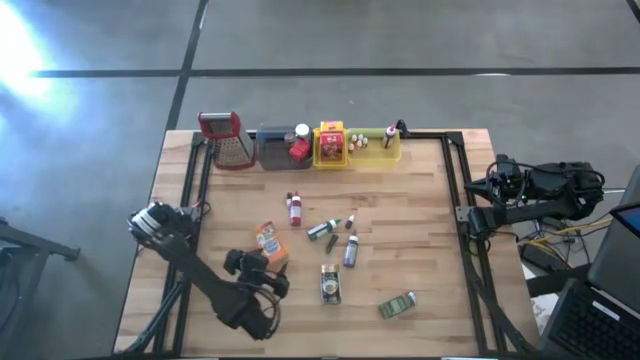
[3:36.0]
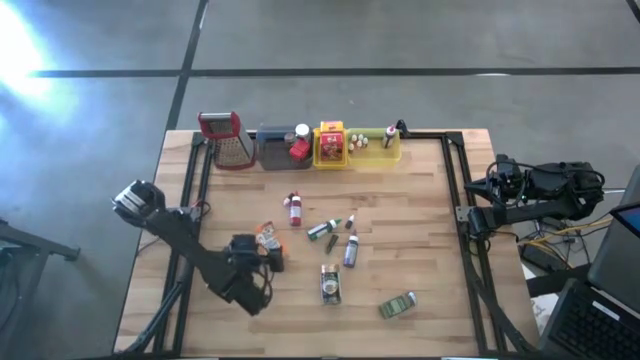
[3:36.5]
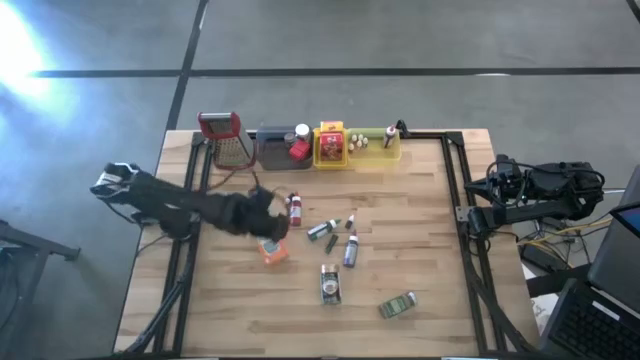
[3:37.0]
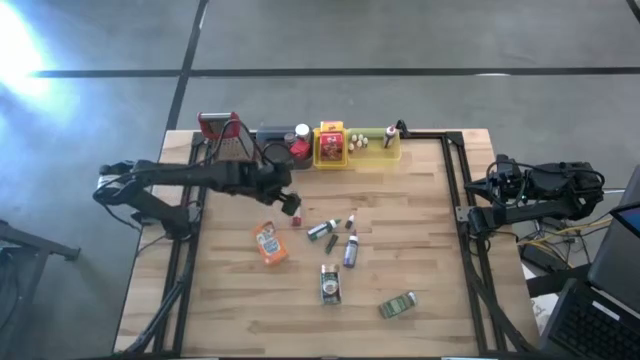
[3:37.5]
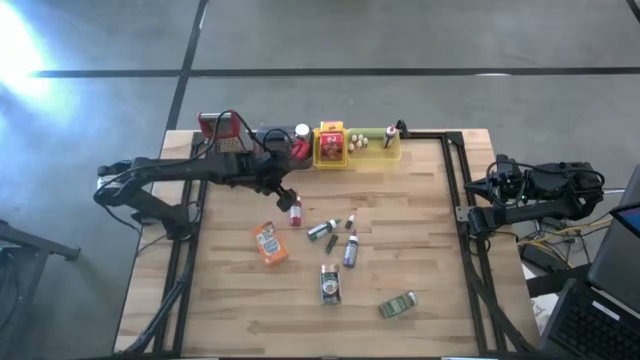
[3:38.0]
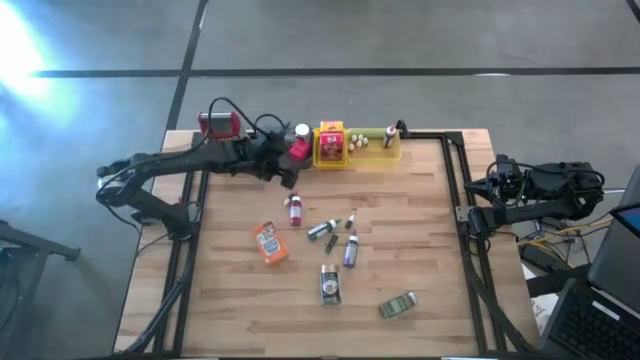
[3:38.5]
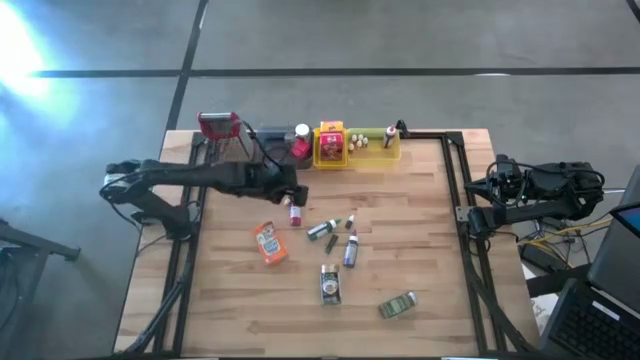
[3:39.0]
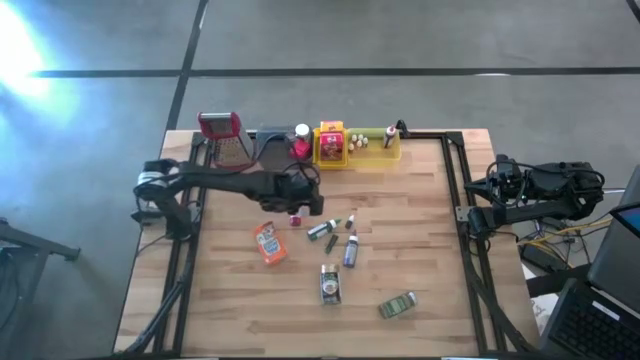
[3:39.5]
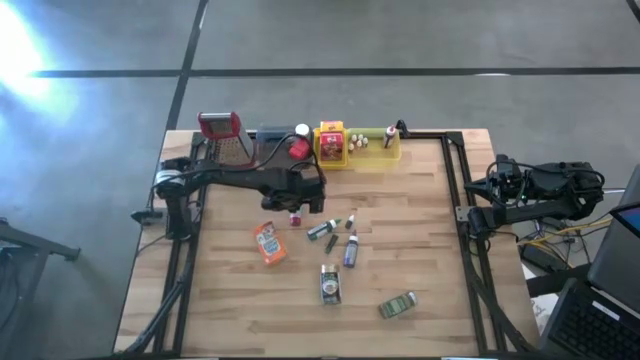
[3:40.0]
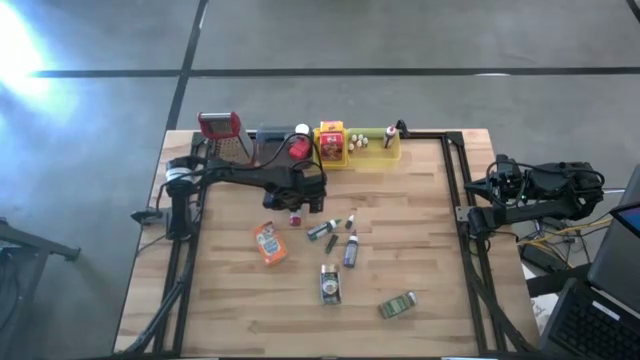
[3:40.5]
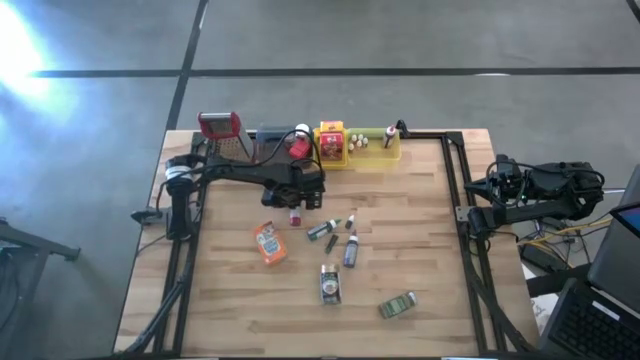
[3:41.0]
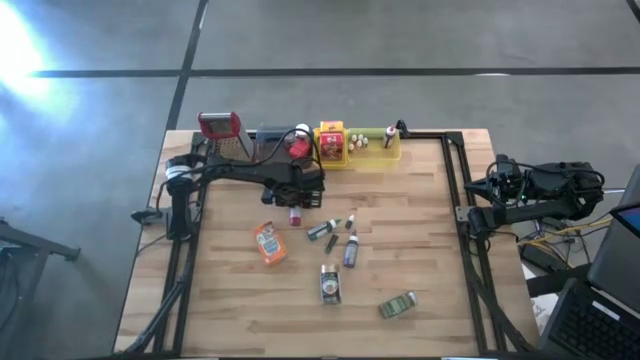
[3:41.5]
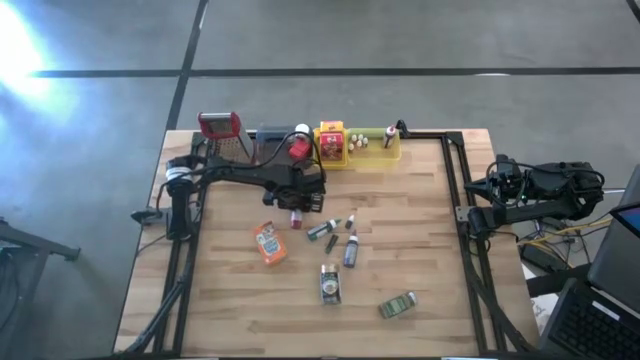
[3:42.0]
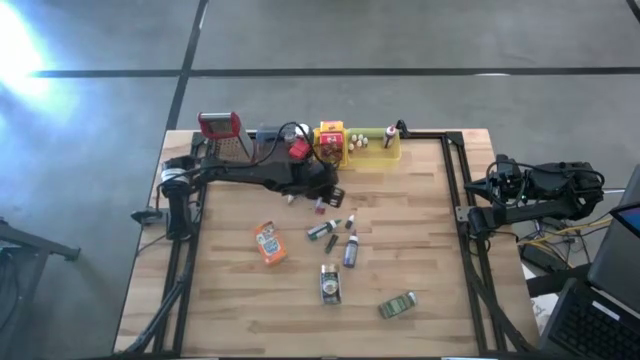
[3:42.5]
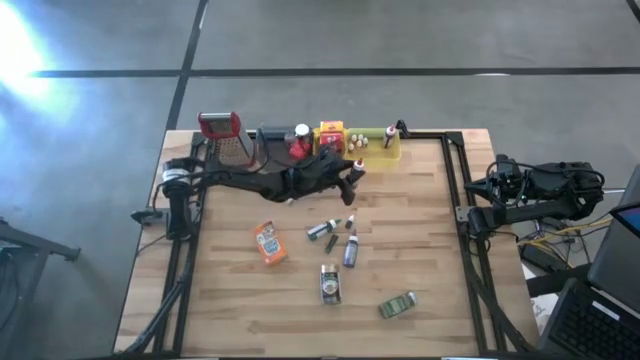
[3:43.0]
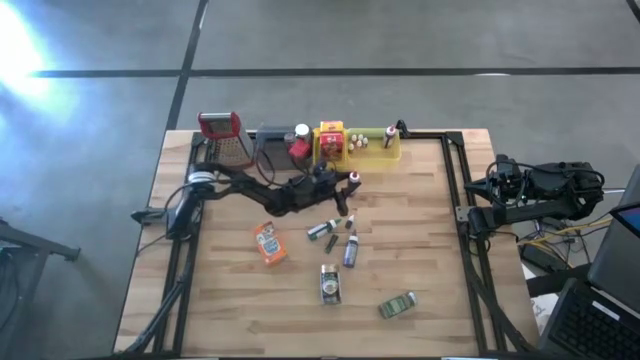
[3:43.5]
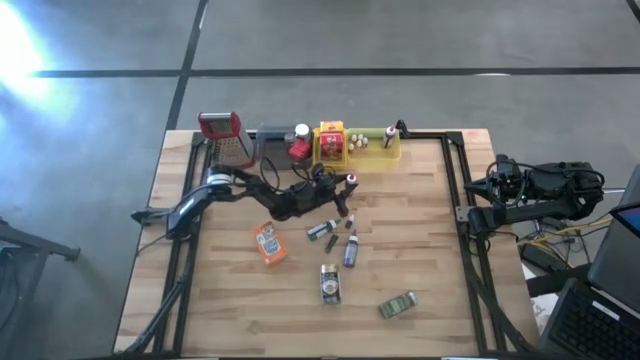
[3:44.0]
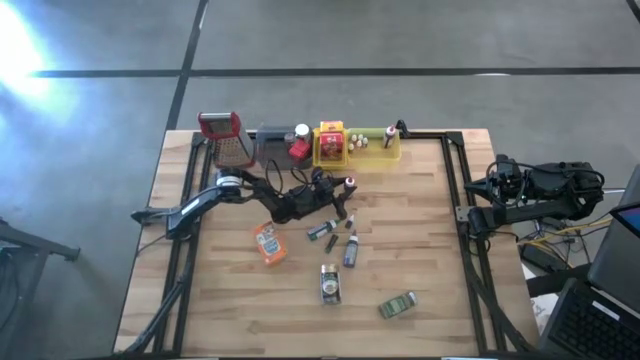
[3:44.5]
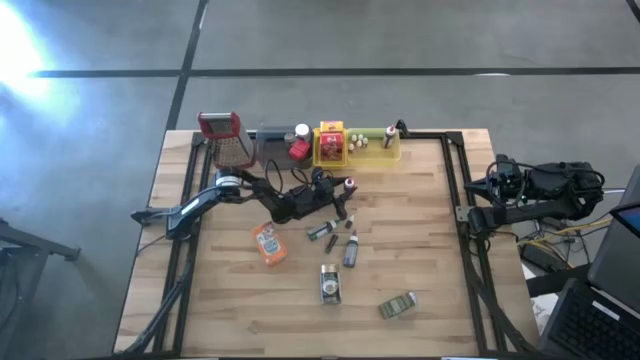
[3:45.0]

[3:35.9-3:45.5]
Task: Pick & Place Kitchen Items
Move the large red food coloring bottle to the top middle of the table

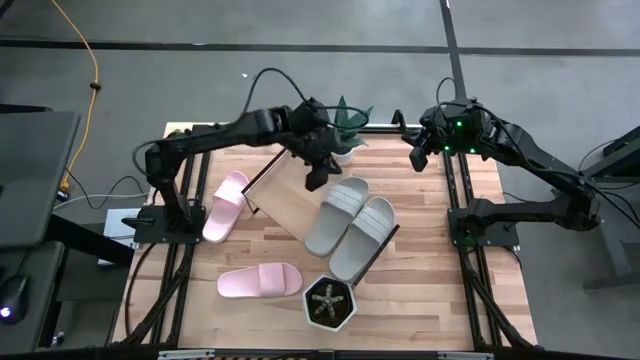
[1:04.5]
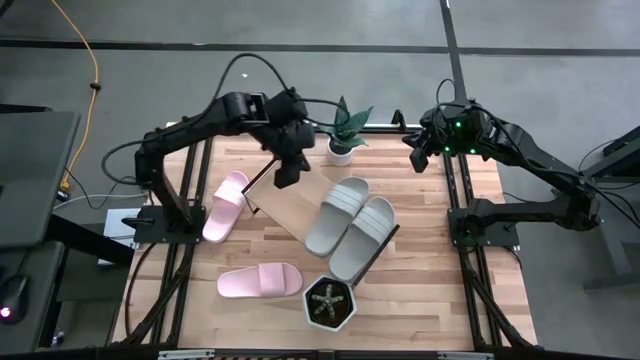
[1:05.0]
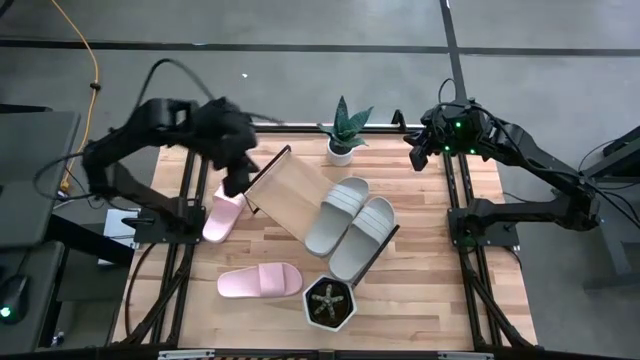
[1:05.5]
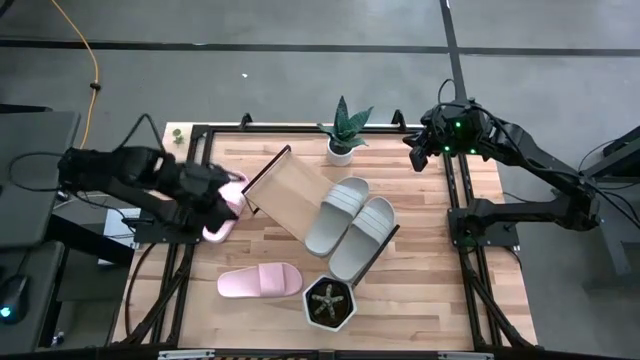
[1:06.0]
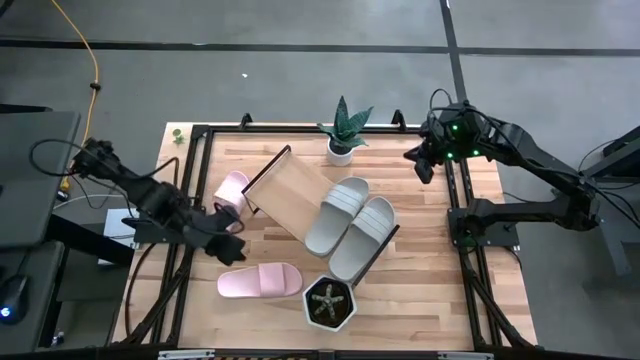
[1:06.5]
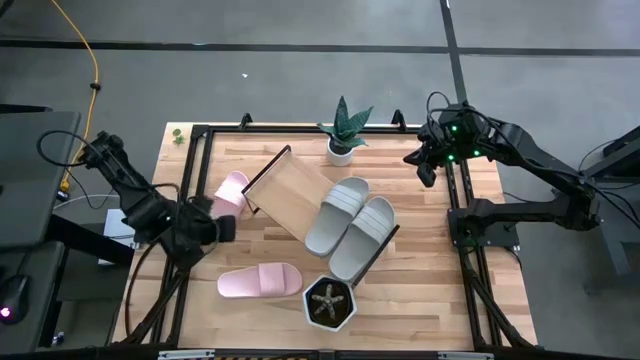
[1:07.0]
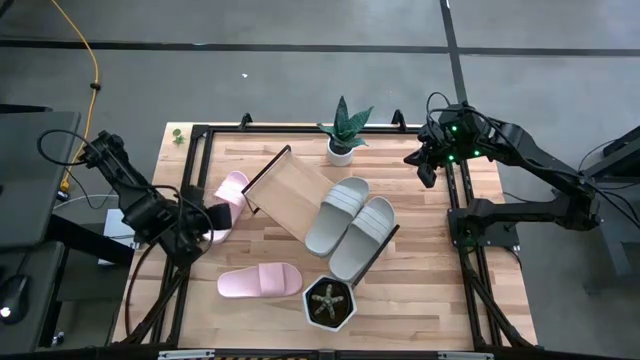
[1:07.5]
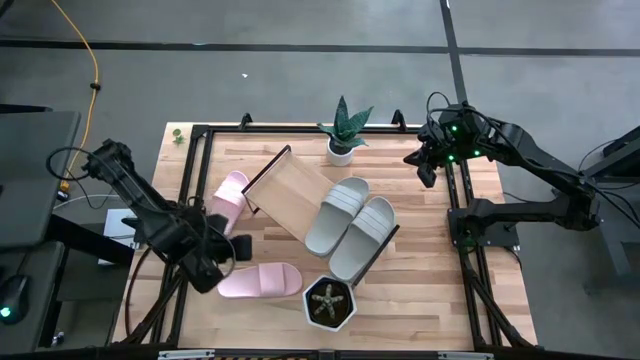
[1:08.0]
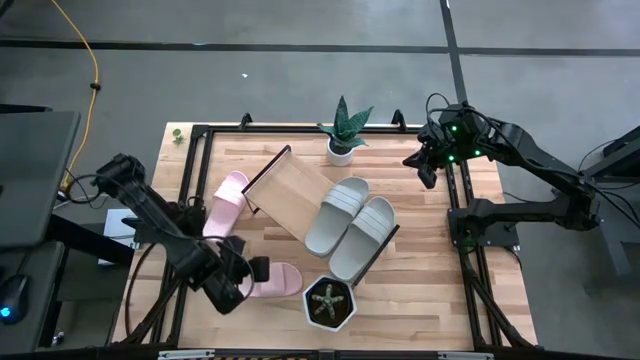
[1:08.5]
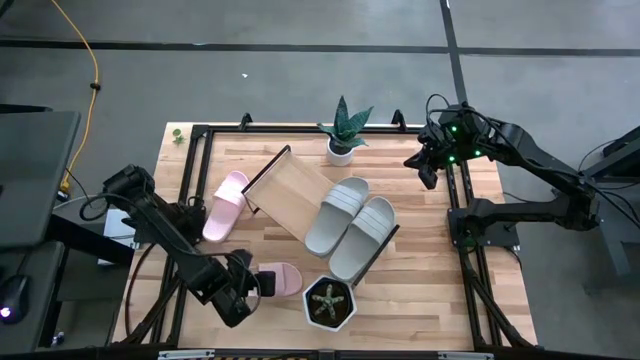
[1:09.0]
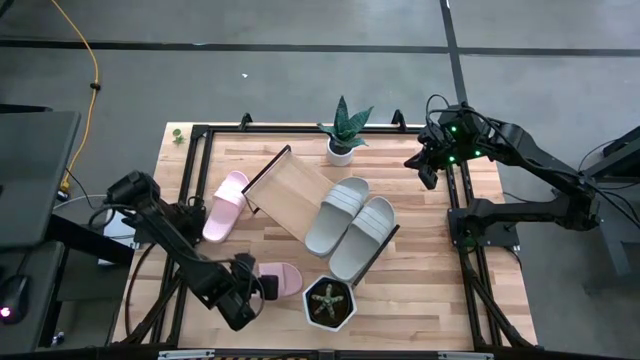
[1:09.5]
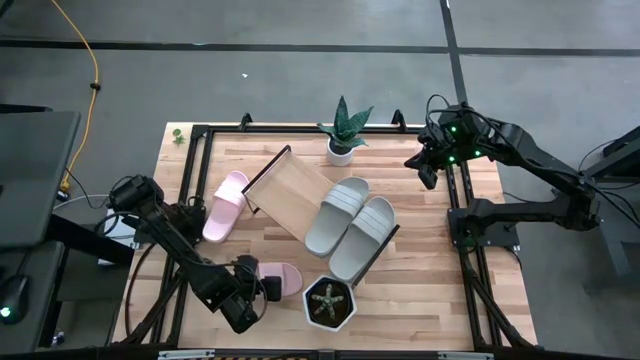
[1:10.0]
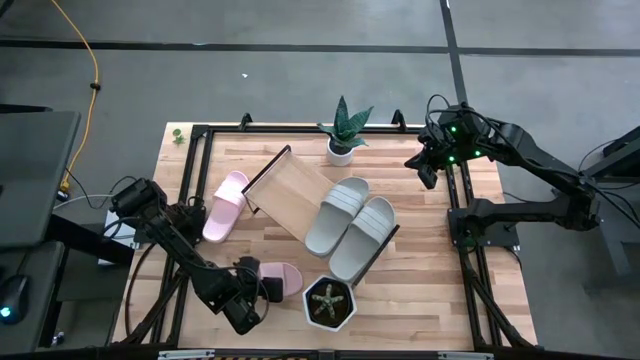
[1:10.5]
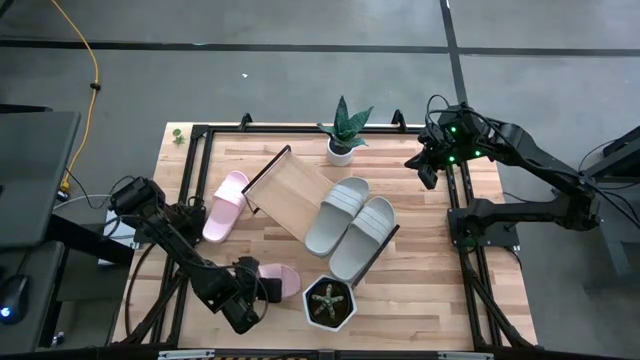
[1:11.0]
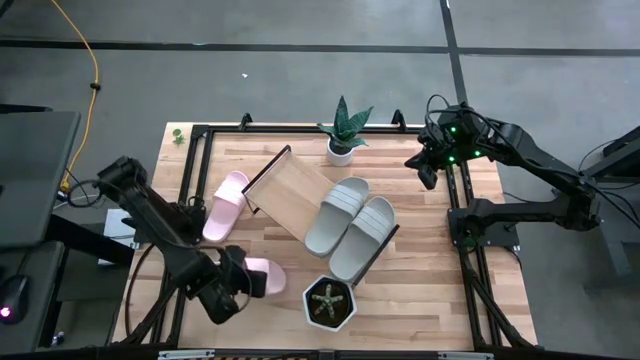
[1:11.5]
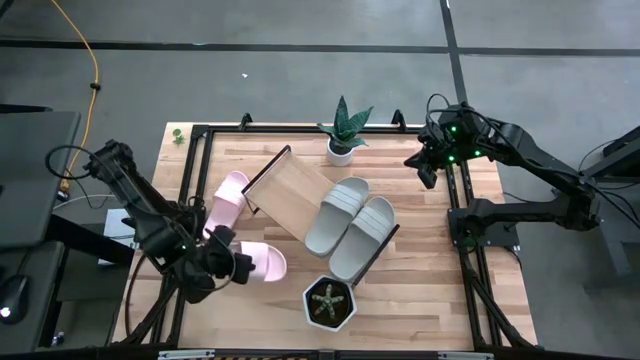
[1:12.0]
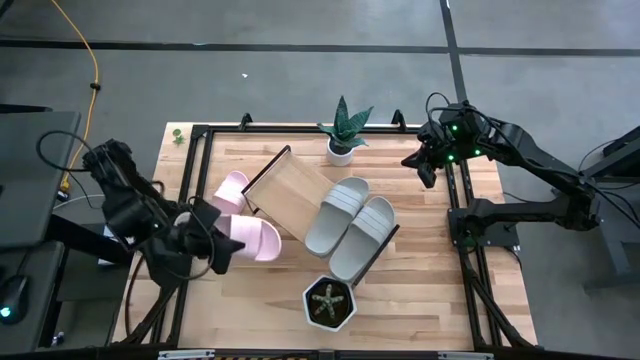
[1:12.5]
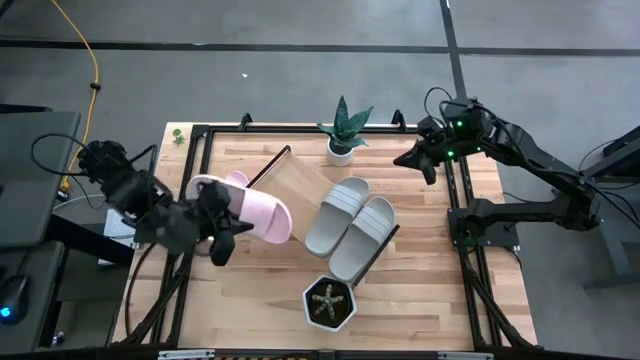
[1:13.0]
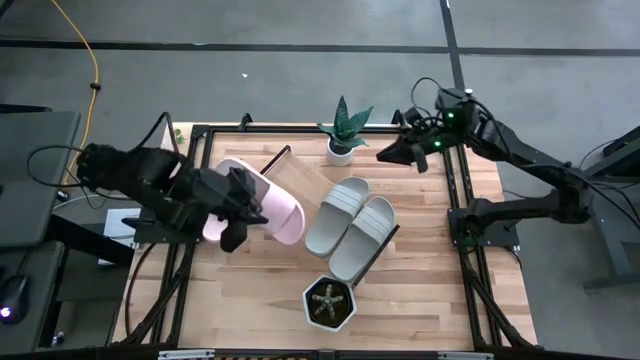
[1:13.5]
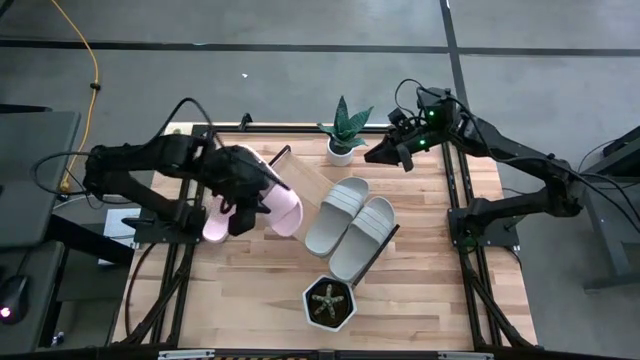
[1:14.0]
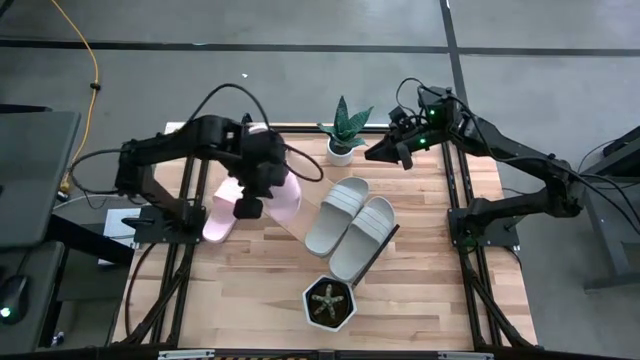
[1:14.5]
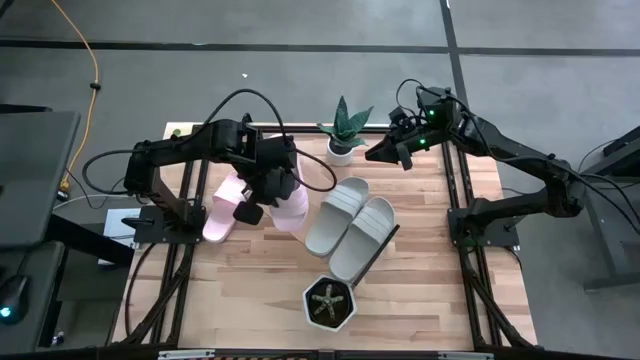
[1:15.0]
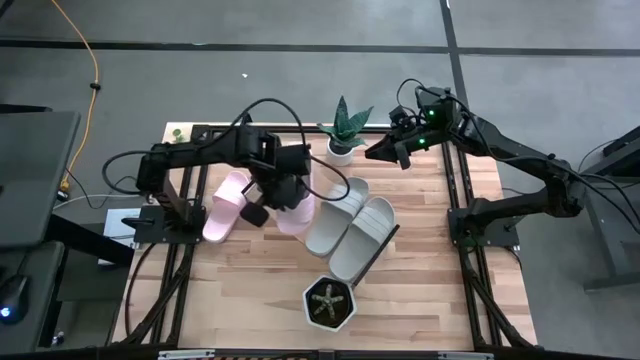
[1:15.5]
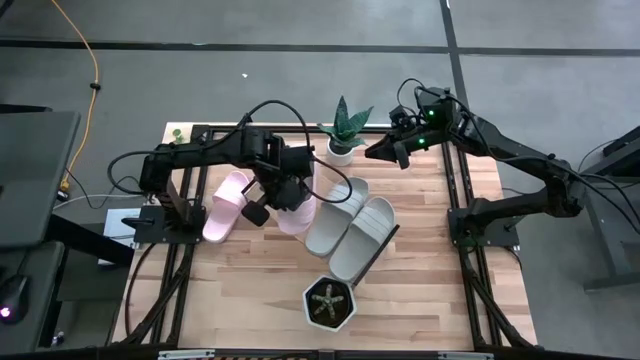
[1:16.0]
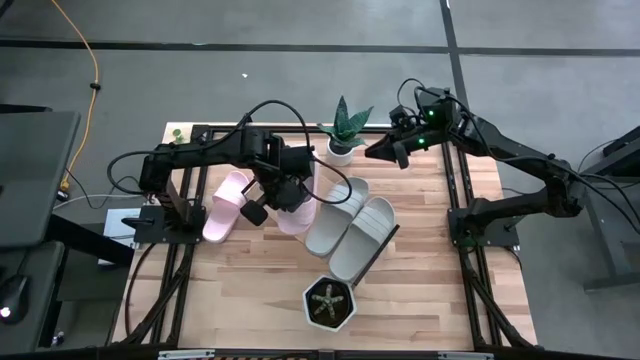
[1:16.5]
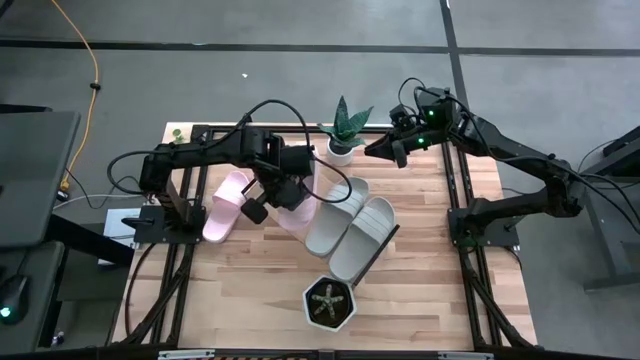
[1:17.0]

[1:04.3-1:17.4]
Task: Pick and place slides into the shelf
Put the bottom pink slipper on the shelf
